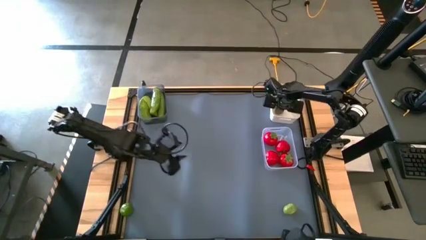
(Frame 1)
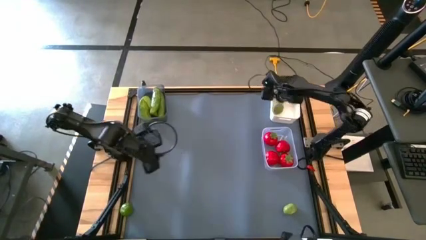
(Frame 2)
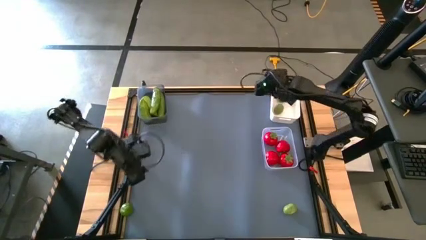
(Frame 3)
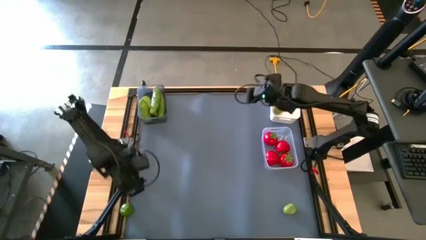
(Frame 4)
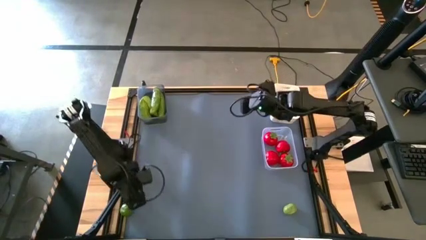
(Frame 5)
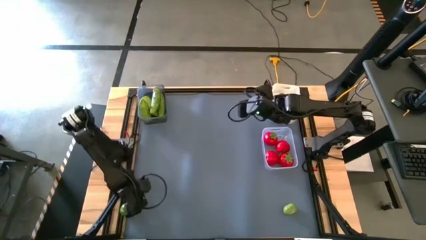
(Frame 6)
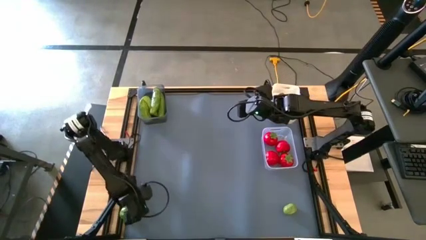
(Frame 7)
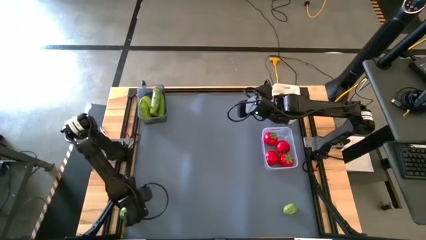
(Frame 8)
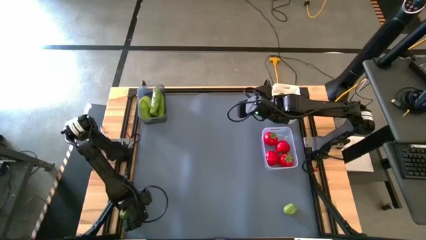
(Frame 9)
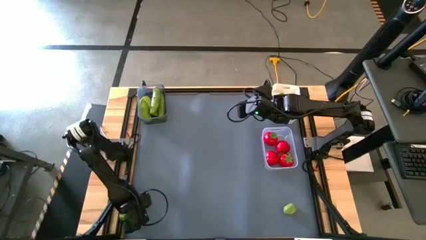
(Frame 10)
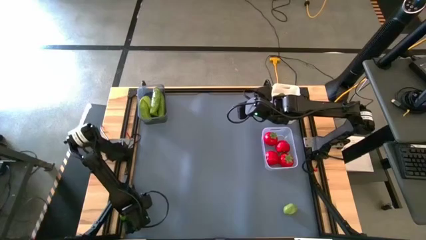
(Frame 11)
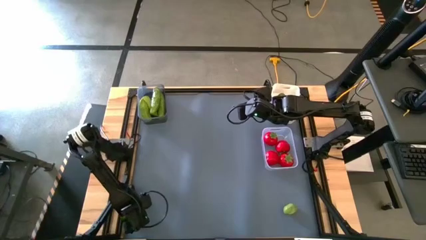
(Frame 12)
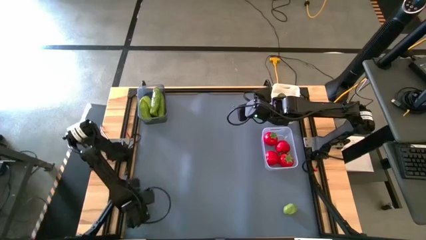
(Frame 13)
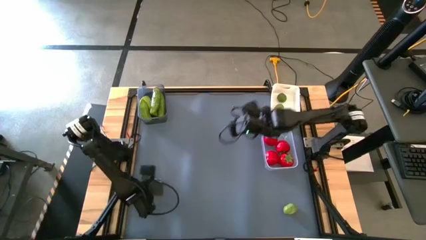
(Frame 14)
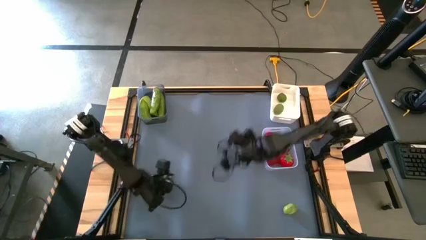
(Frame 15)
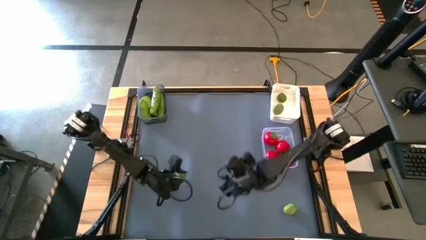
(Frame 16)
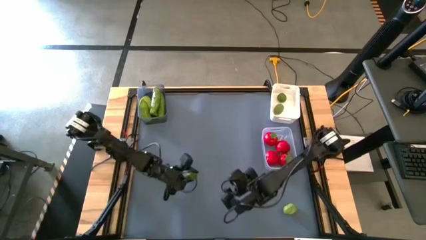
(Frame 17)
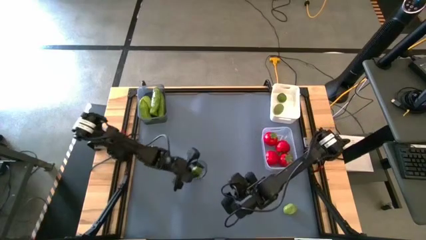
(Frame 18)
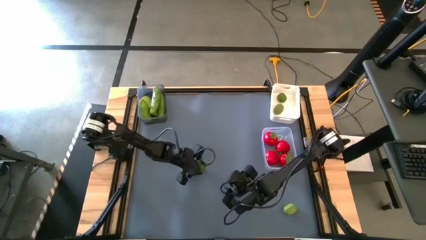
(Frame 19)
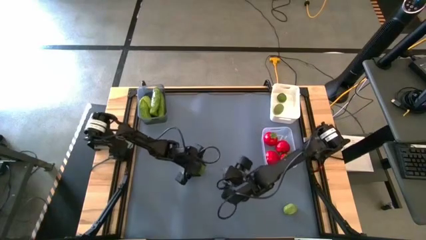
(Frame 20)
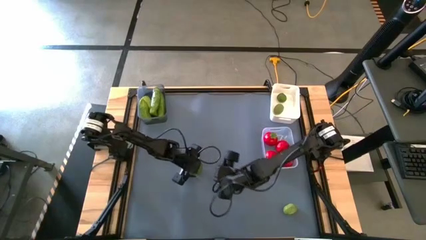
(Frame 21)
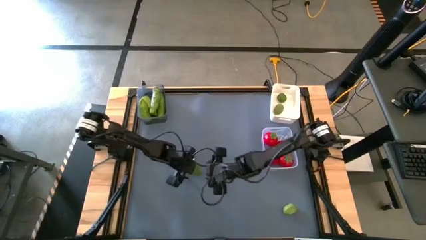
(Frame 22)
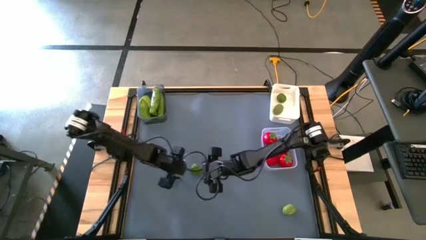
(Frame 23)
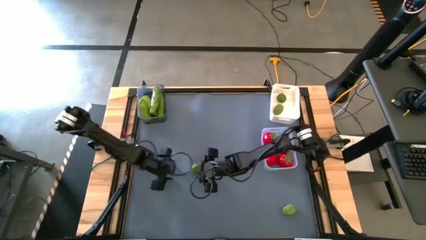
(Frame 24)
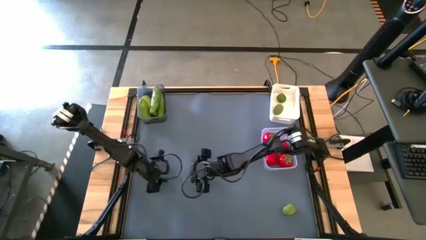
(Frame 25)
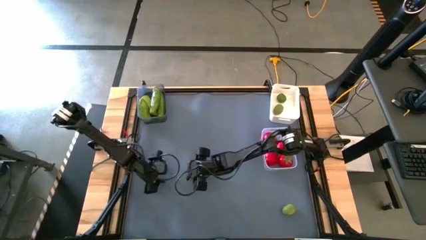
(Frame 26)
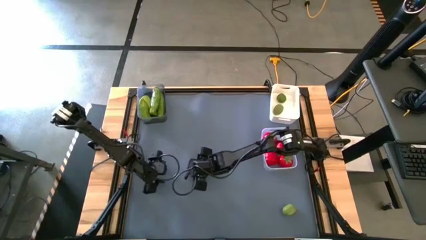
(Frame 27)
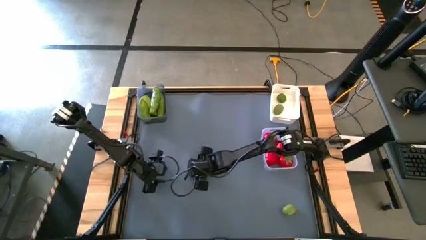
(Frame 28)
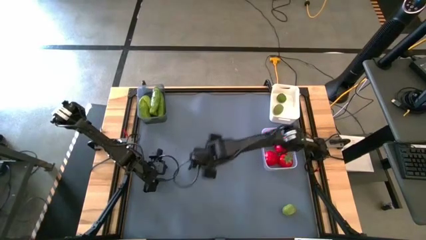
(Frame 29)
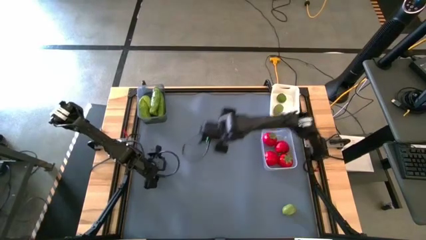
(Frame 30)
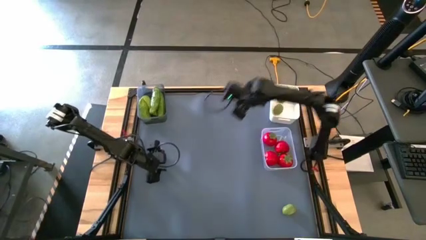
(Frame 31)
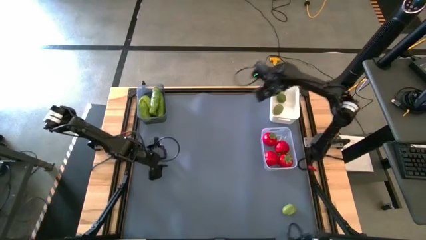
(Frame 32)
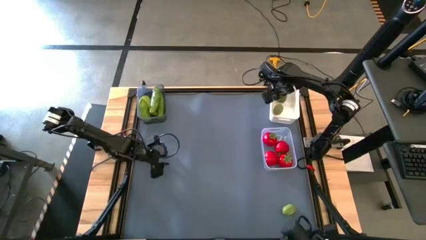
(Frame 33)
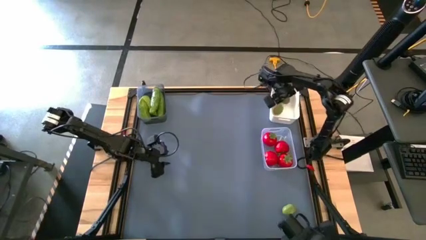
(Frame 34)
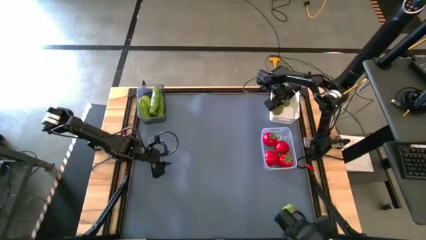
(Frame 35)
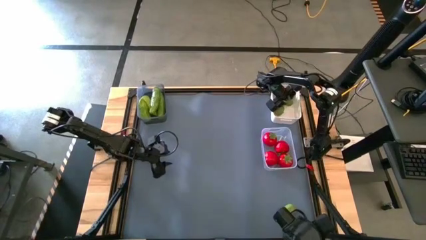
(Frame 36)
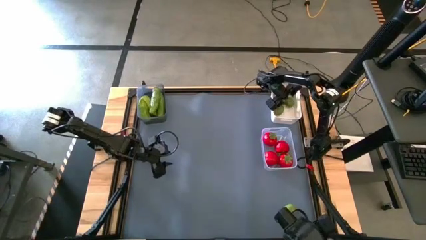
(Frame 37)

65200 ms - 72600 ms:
Task: Sort produce into baskets
Put the lime into the white bin

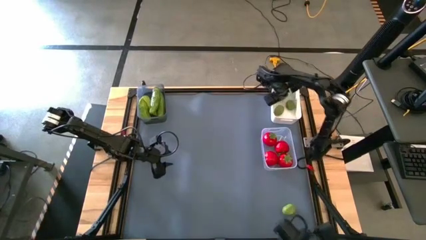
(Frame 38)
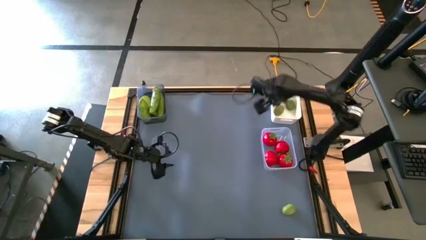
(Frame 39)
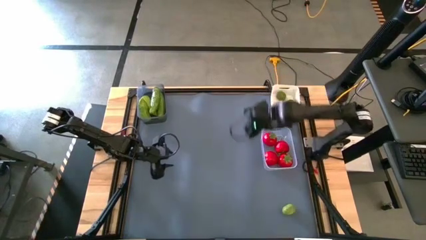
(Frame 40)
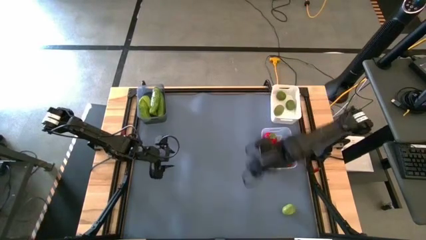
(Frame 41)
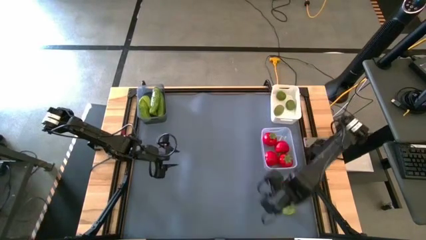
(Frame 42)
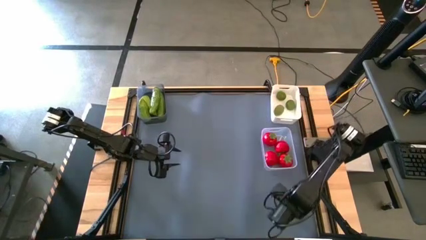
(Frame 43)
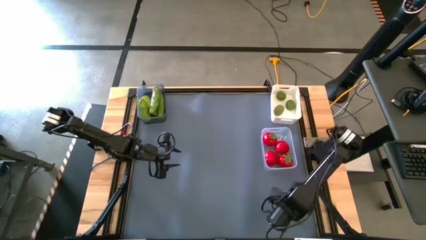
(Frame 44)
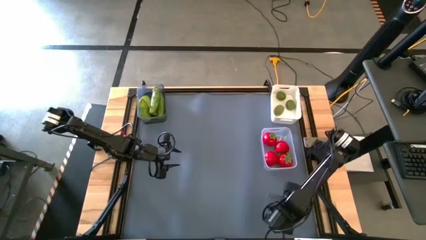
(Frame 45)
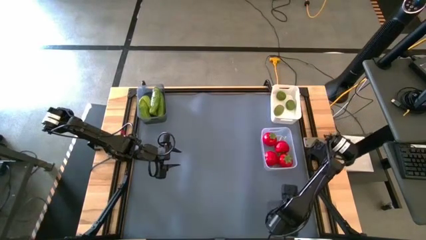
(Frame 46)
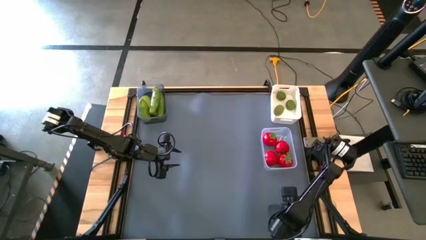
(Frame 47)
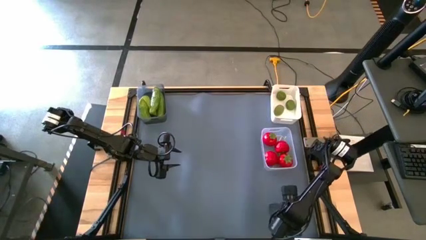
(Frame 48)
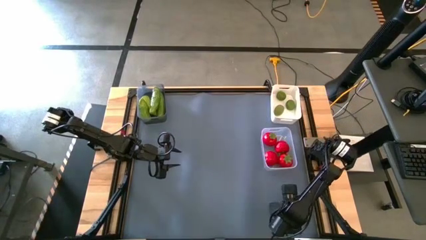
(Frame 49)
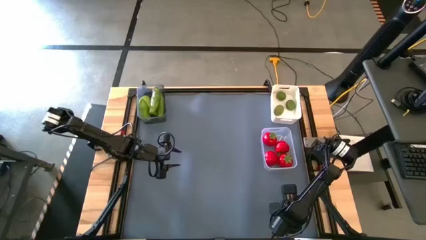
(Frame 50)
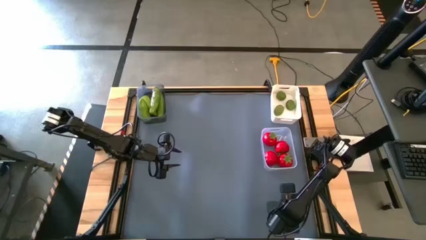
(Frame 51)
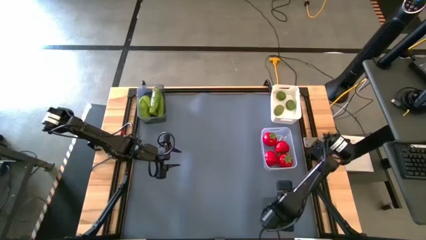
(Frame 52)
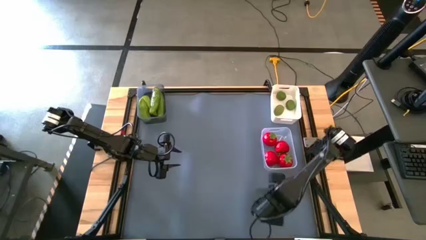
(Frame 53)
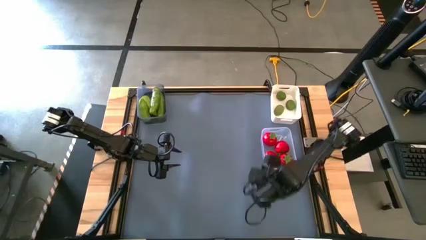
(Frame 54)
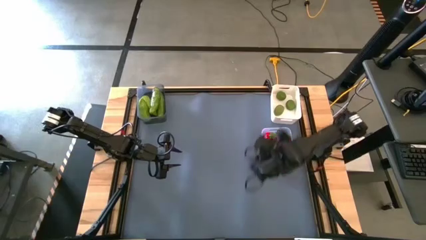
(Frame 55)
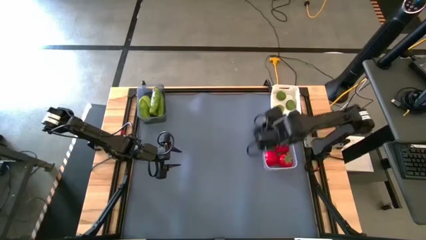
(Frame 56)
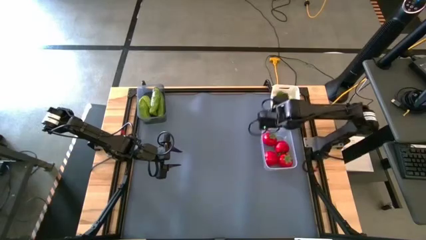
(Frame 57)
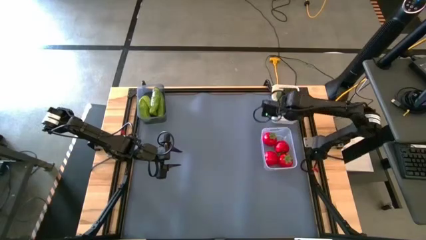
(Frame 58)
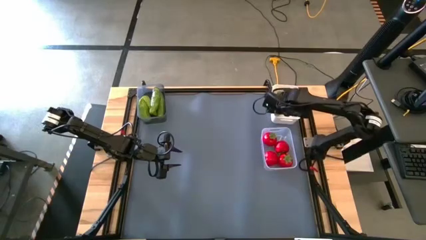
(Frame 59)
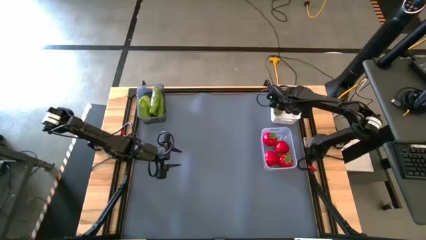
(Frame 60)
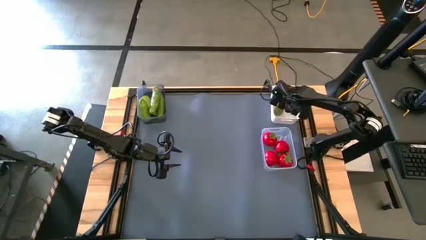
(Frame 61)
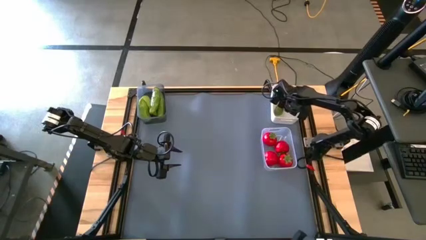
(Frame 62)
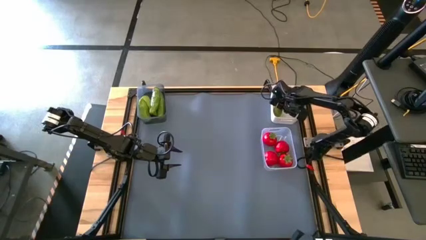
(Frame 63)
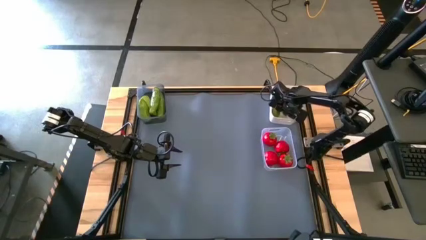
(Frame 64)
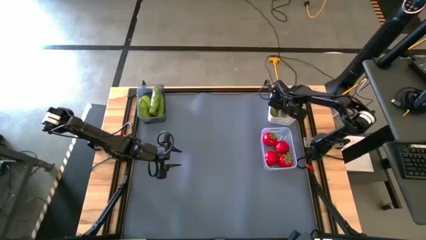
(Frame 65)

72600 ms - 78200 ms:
Put the lime into the white bin

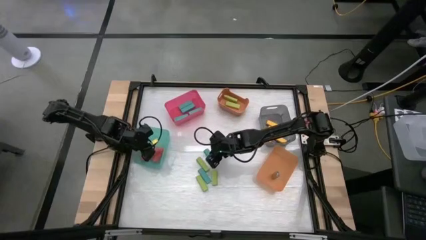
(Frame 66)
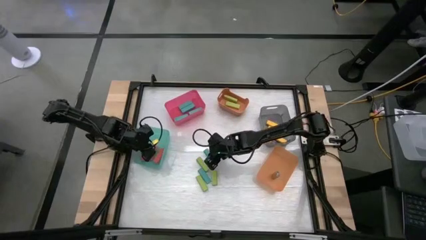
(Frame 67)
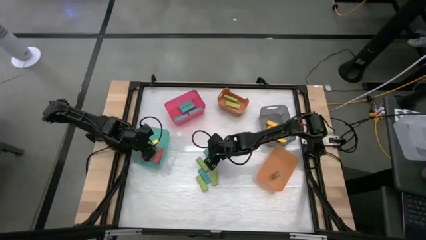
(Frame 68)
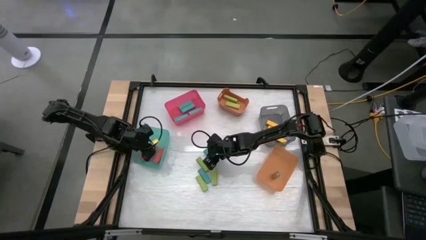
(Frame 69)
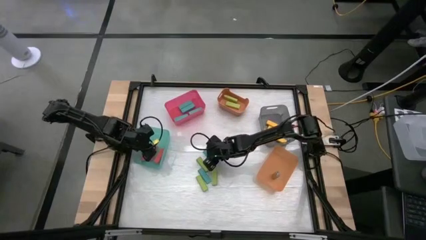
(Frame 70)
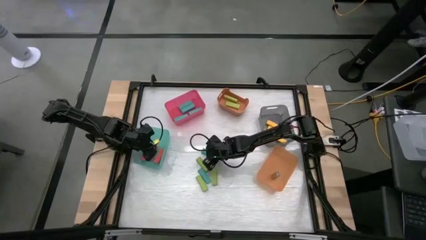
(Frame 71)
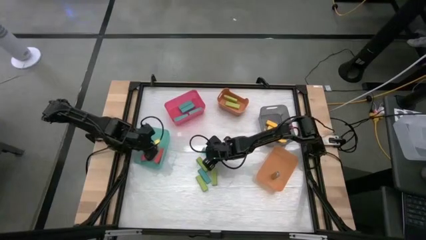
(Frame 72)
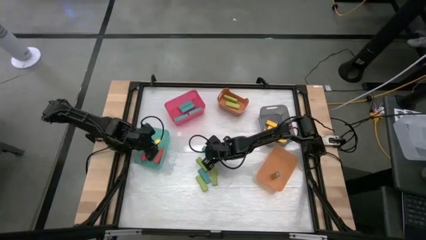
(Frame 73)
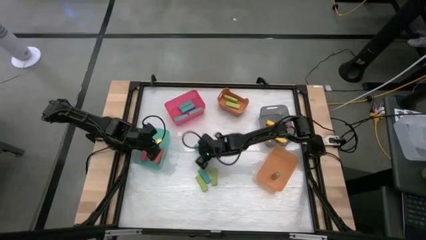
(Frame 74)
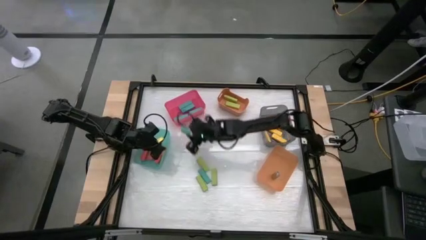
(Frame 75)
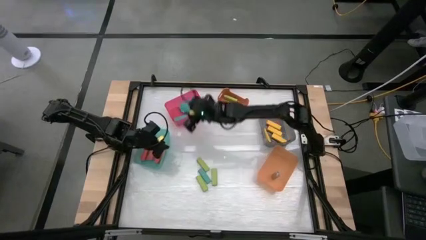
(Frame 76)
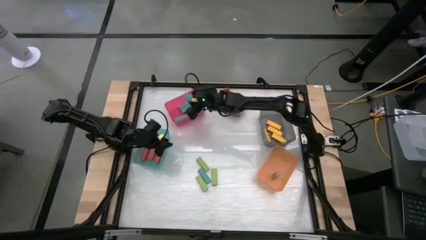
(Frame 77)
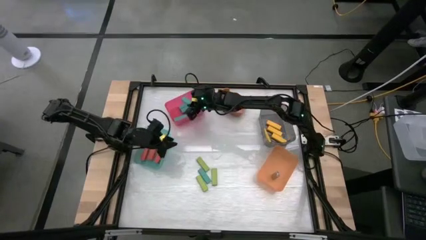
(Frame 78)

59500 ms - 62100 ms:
Task: Sort blocks
Put the blue block into the pink bin

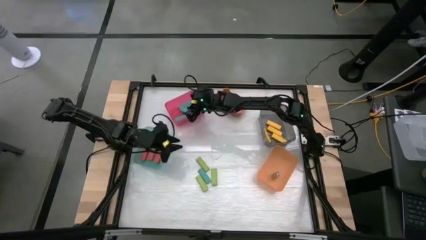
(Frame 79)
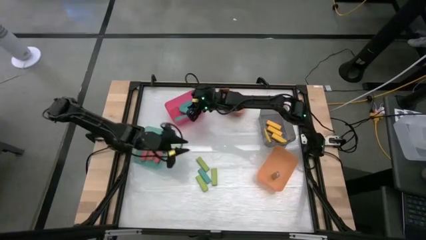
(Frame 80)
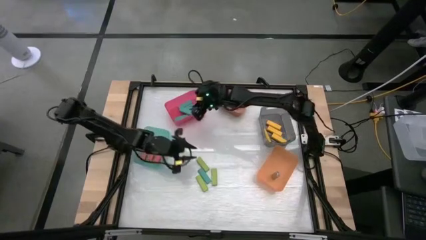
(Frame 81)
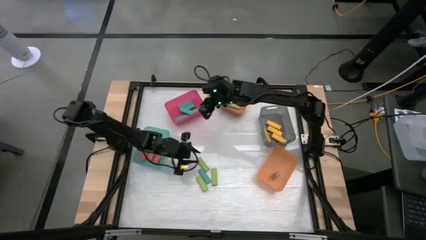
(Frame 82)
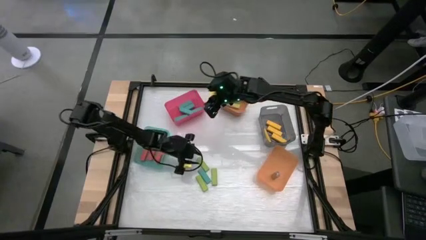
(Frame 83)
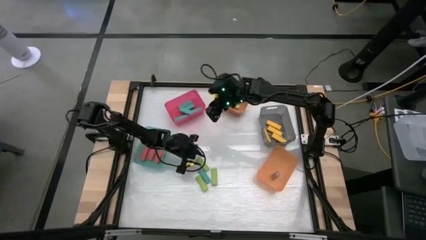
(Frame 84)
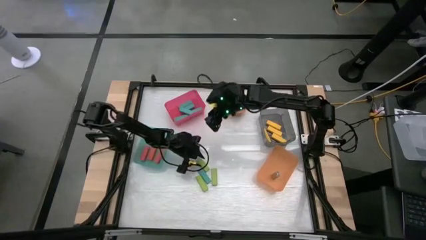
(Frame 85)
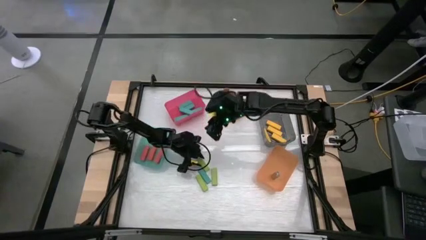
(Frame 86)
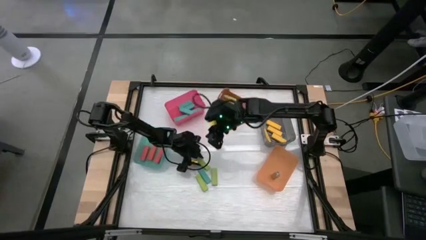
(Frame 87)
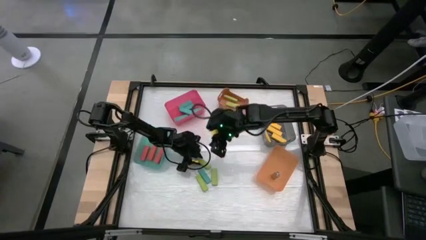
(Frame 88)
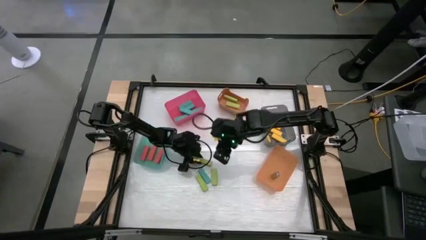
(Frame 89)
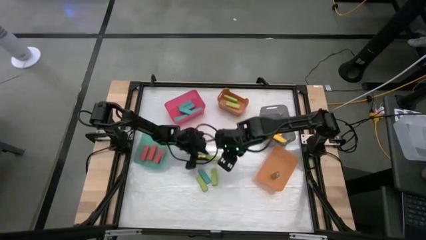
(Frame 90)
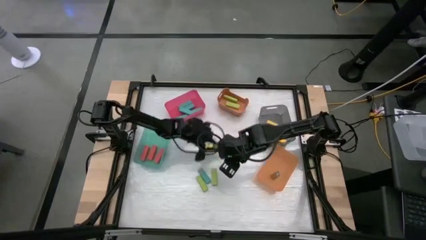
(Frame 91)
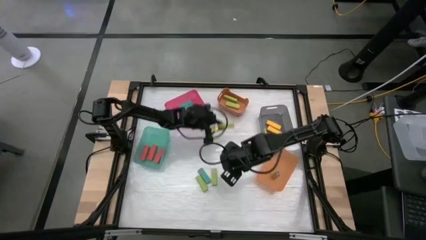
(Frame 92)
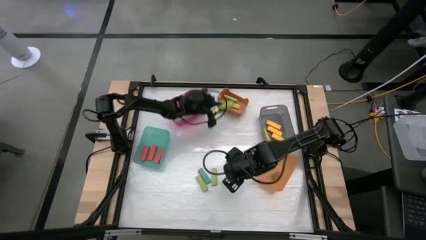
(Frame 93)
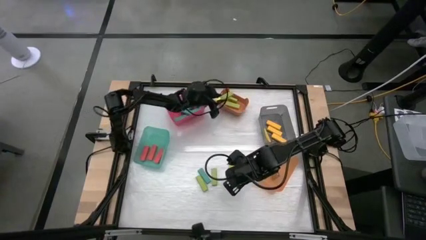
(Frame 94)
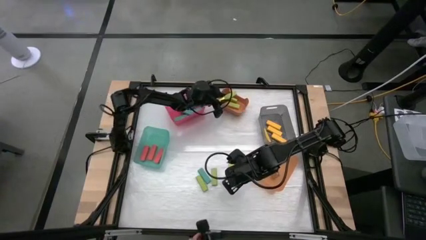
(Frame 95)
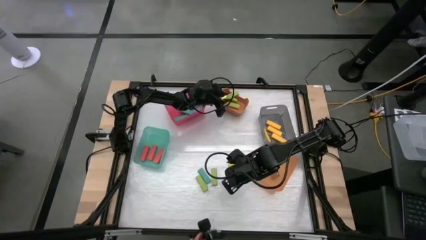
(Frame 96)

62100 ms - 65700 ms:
Put the green block into the orange bin
